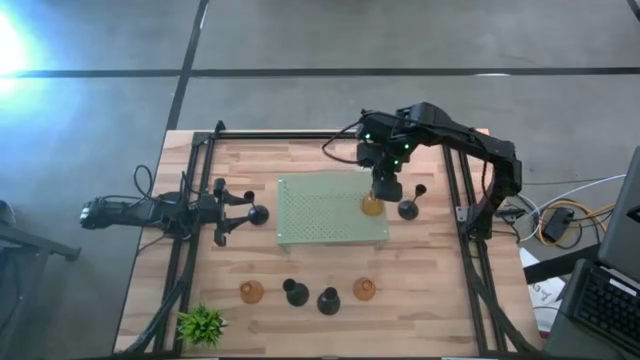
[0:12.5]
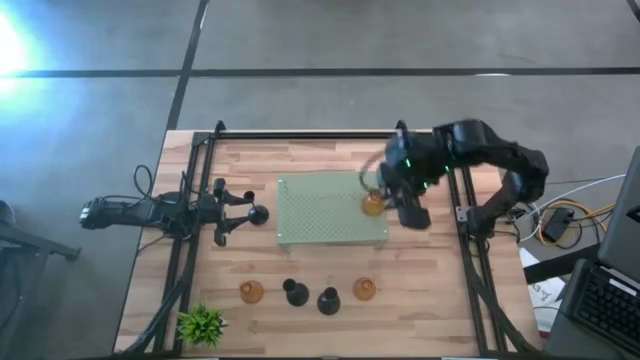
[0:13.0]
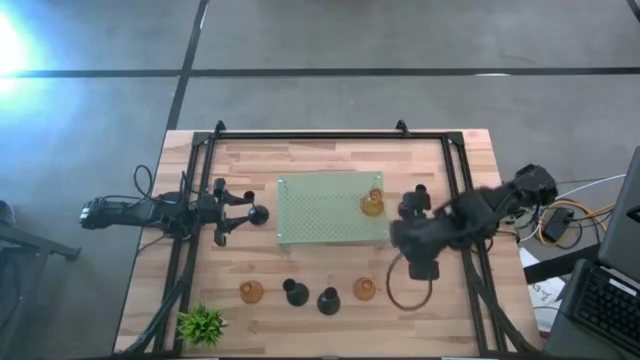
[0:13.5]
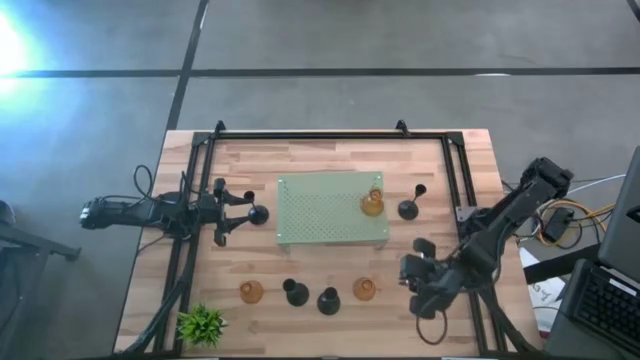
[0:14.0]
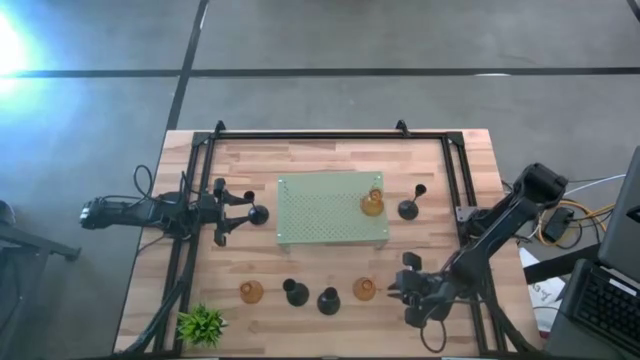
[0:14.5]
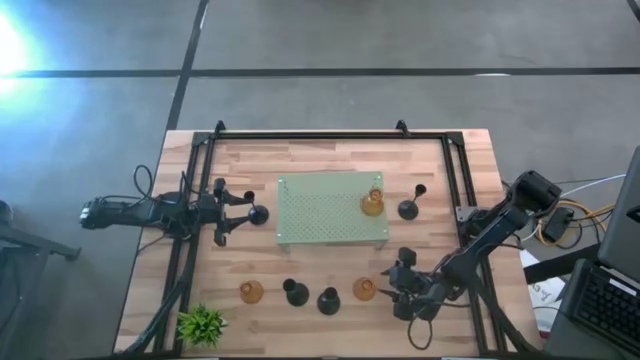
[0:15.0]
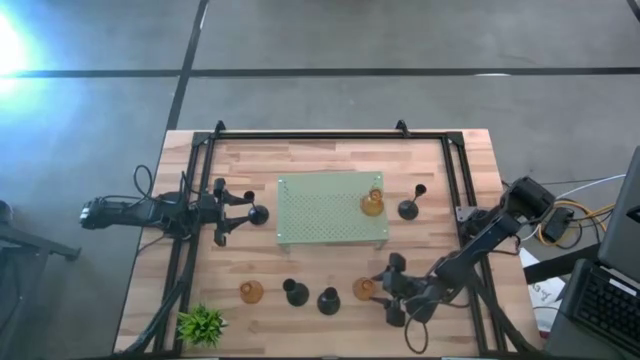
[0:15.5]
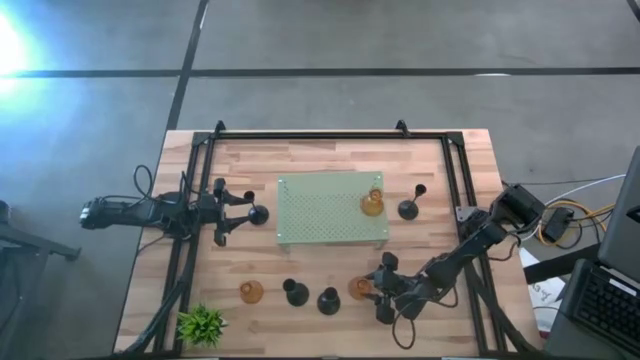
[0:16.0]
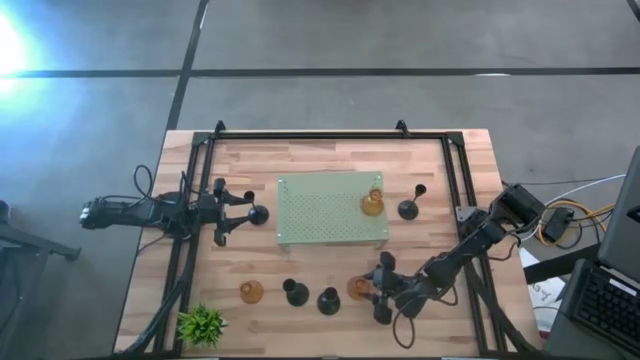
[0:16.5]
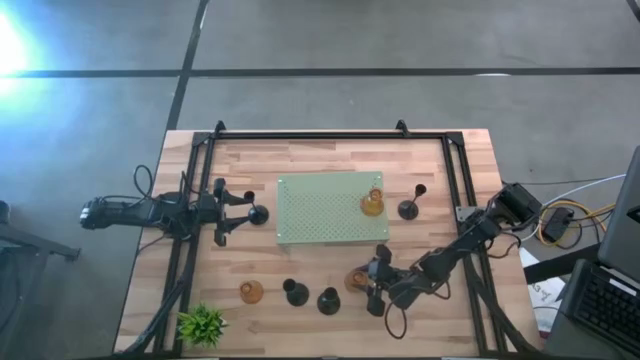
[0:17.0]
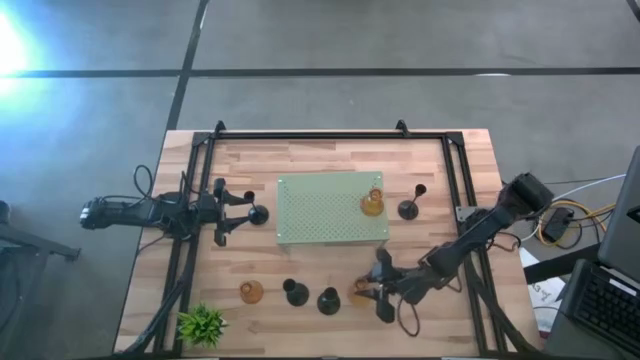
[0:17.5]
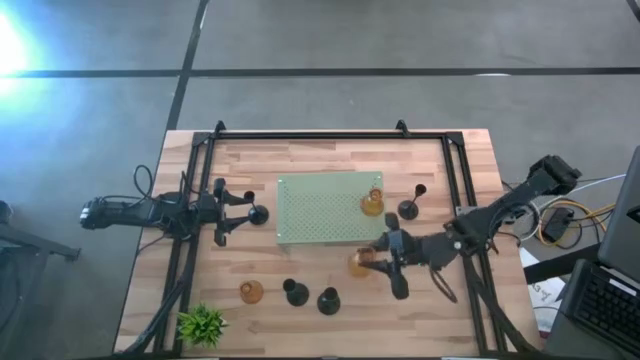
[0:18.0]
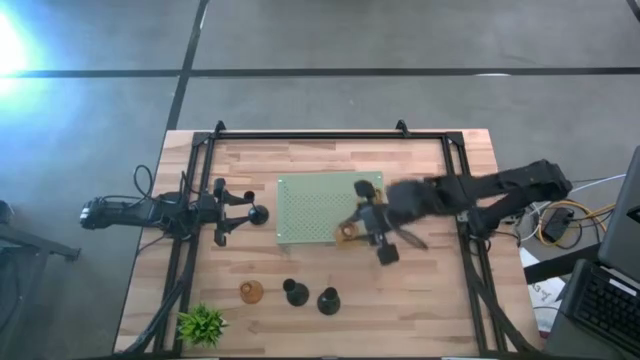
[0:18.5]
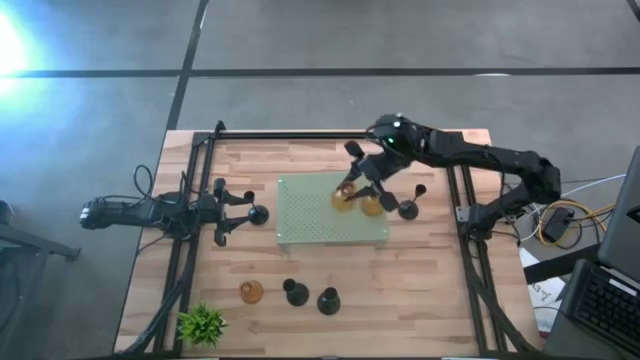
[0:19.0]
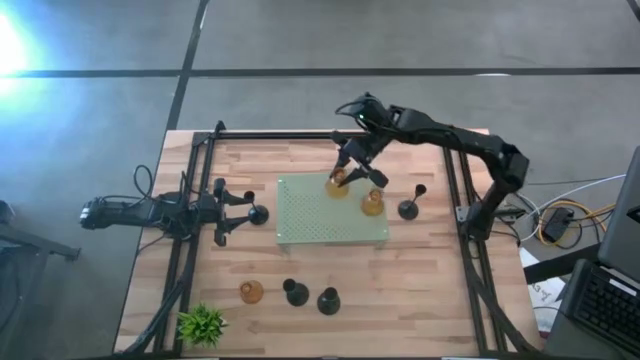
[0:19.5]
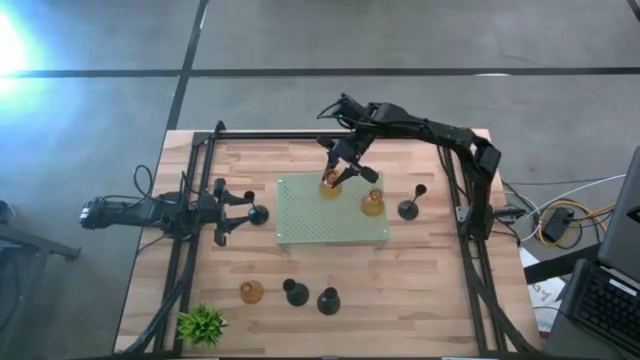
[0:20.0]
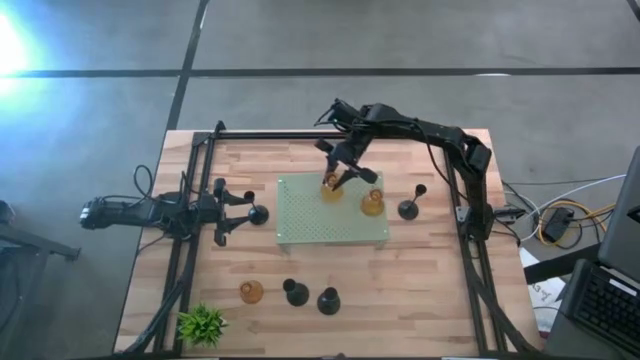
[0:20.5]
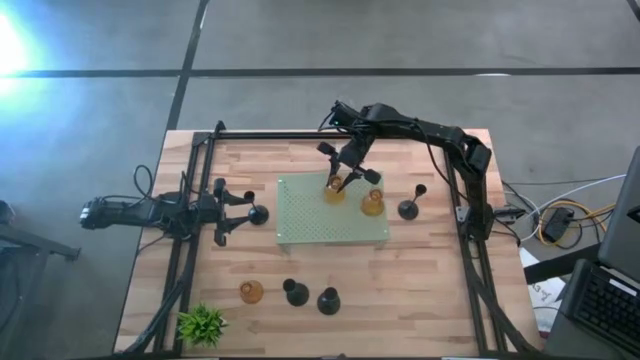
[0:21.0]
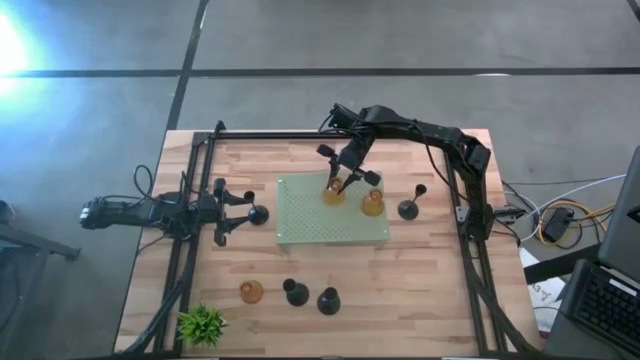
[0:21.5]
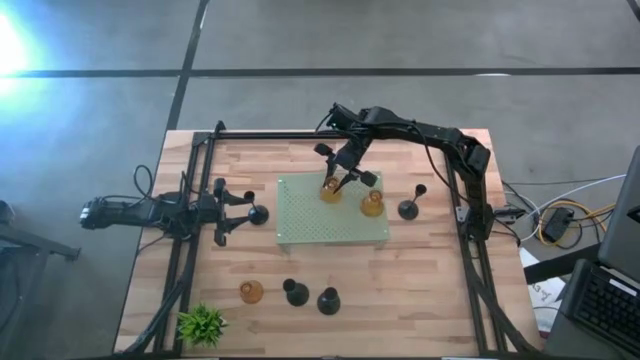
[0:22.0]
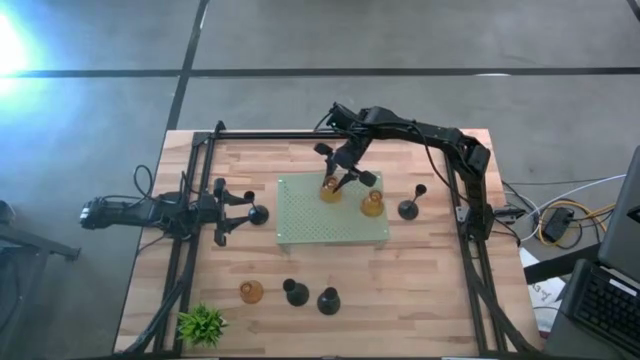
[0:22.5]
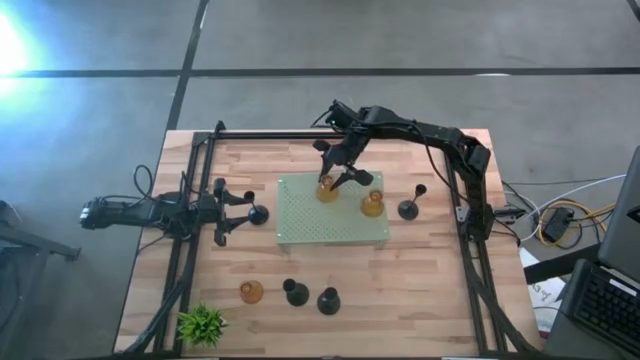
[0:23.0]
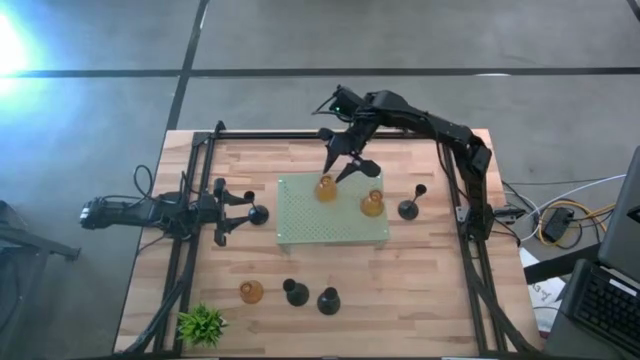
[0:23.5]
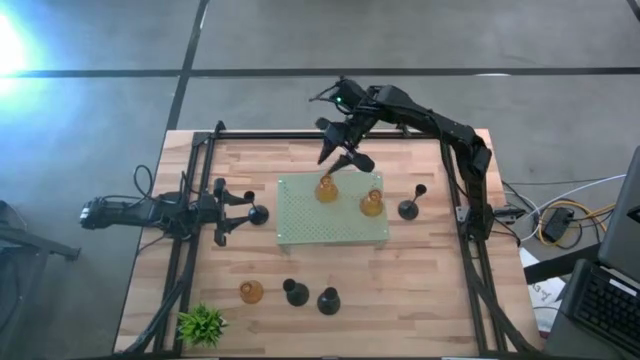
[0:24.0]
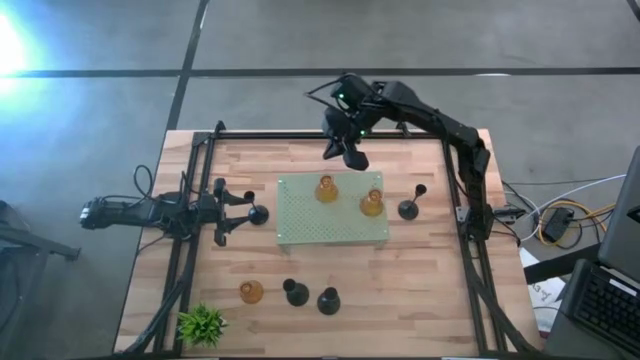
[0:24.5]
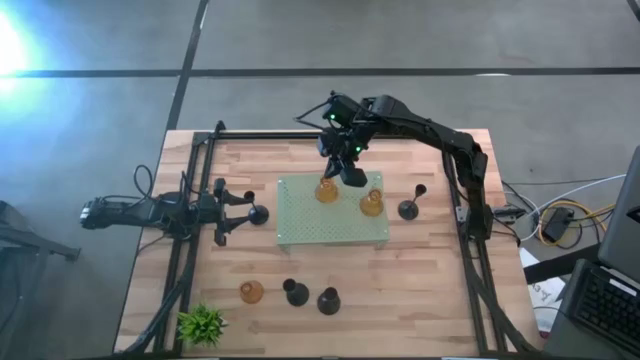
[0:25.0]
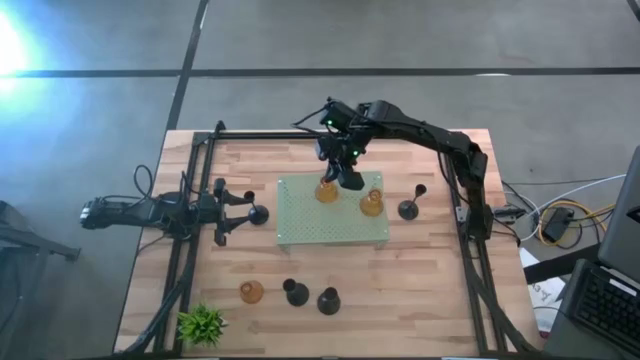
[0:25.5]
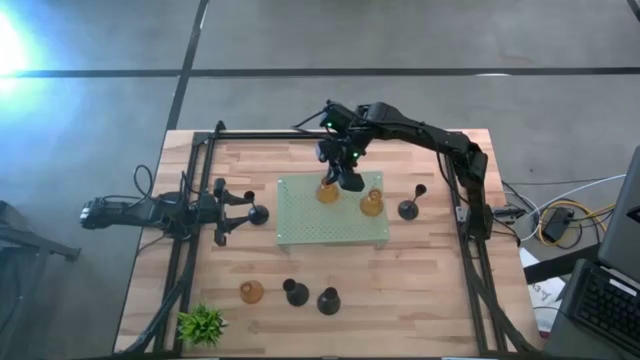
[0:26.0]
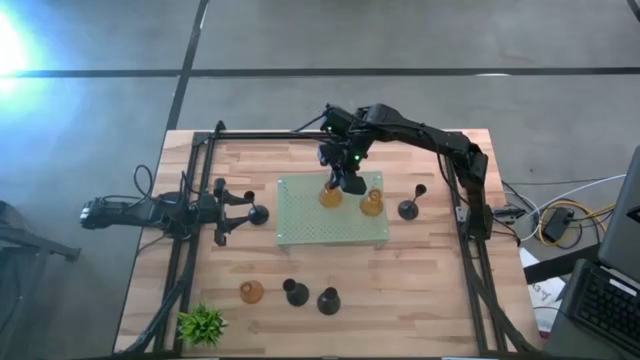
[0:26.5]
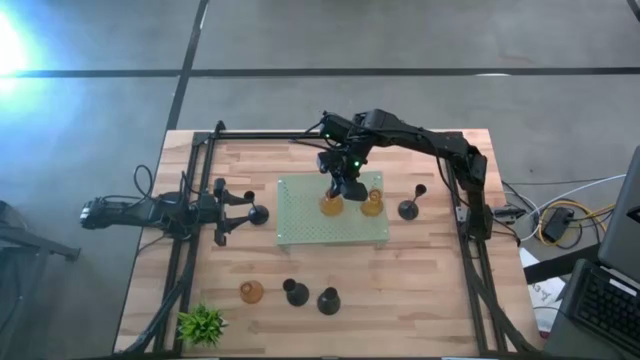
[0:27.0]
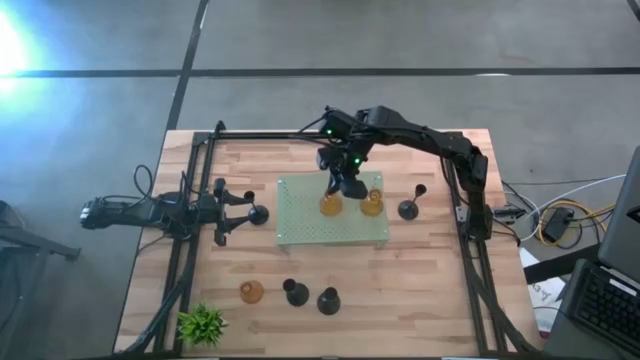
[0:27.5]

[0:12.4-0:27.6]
Task: Pick & Place candle stick holders
Put the yellow glass candle holder on the shelf

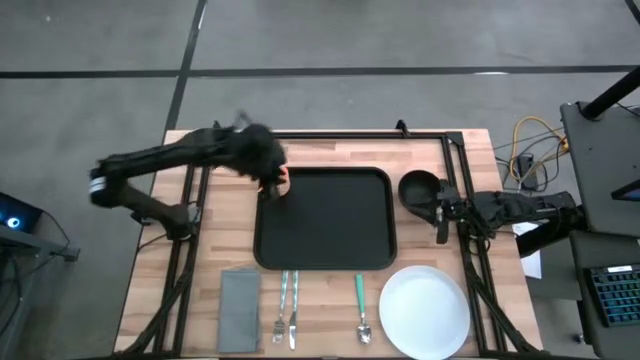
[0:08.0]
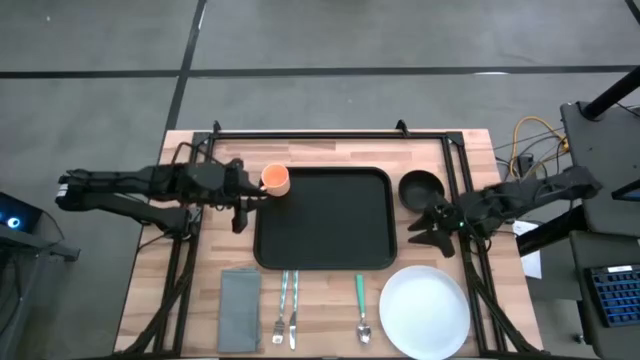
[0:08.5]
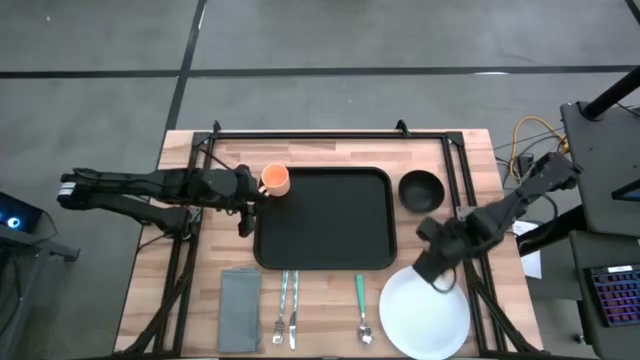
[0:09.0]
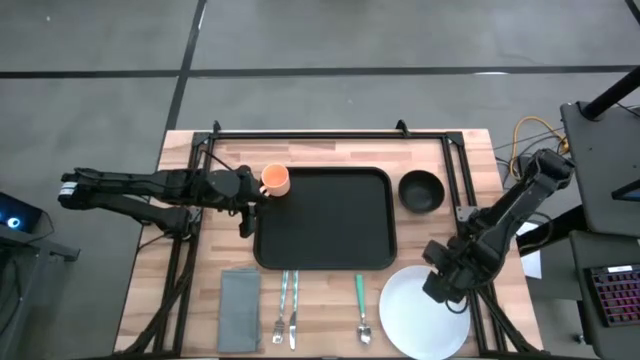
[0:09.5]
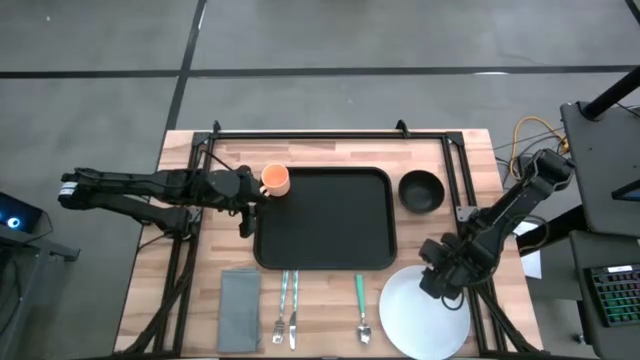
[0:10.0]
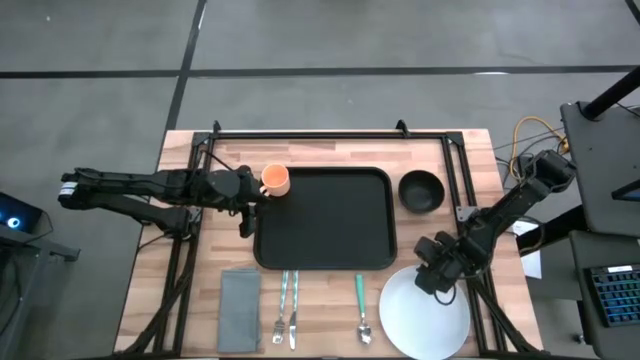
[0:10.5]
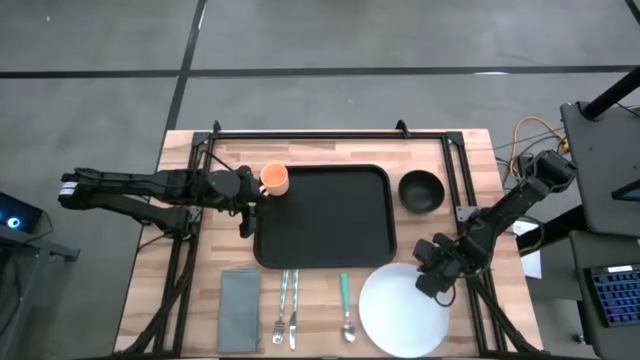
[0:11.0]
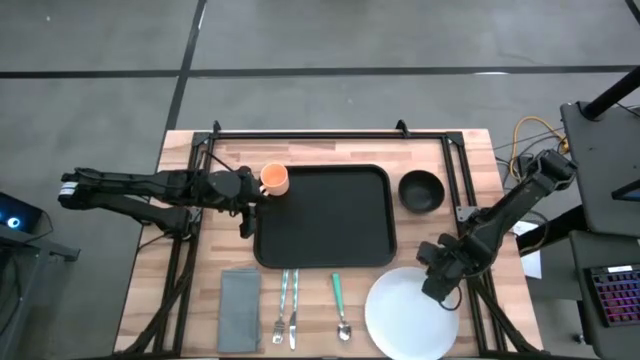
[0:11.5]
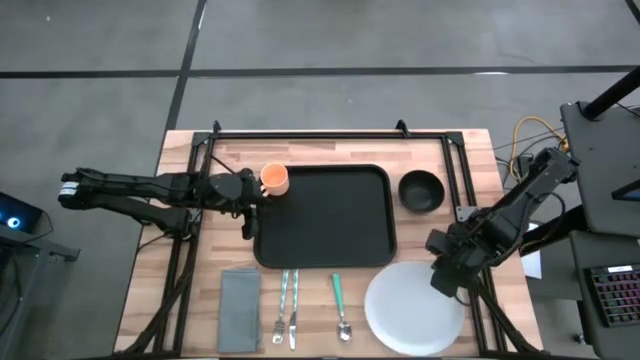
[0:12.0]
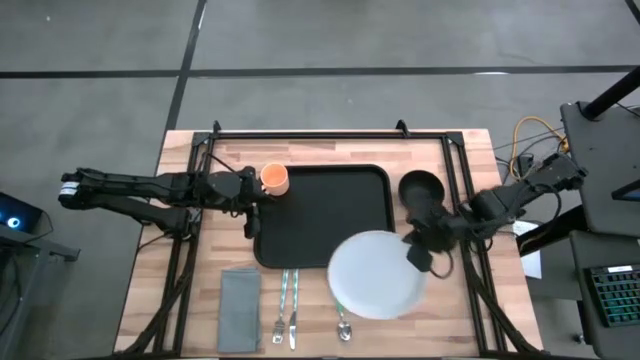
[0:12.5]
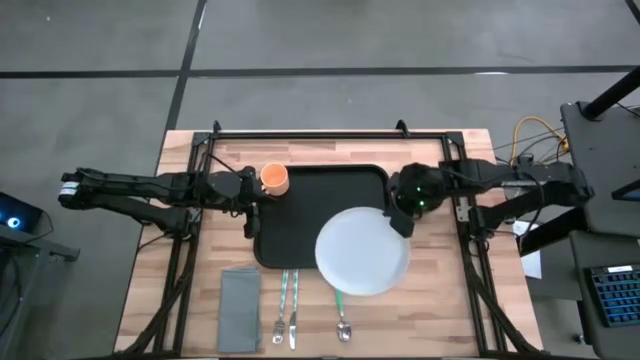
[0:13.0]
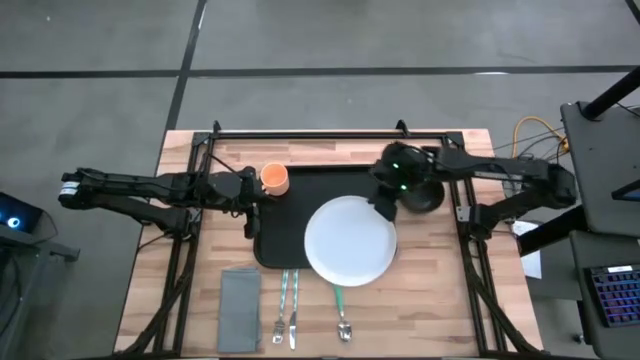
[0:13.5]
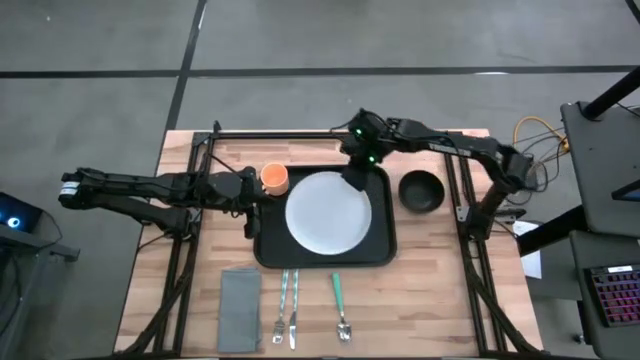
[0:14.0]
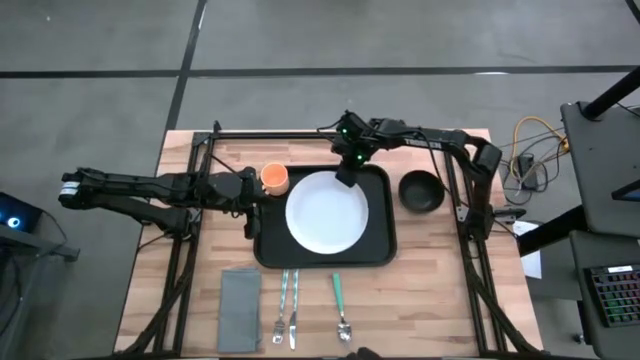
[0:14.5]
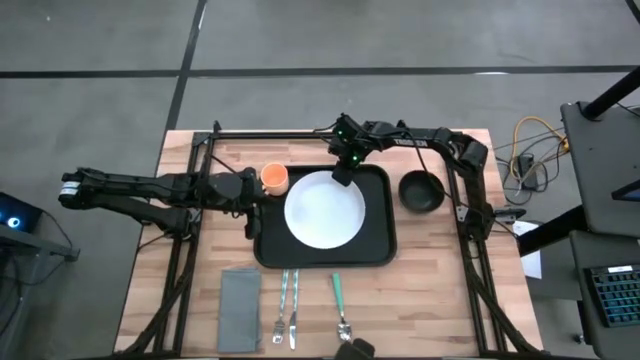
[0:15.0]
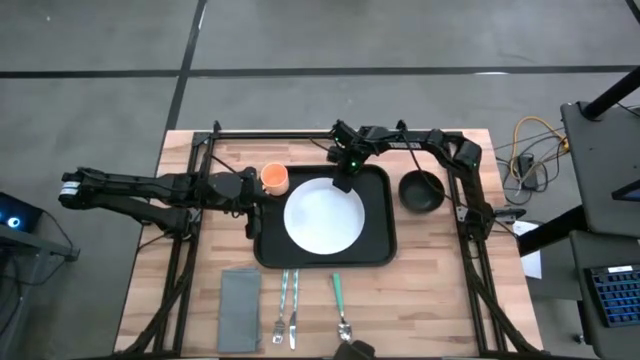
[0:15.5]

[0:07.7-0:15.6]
Task: Set up tray
Put the white plate on the black serving tray to the bottom right of the orange mug
